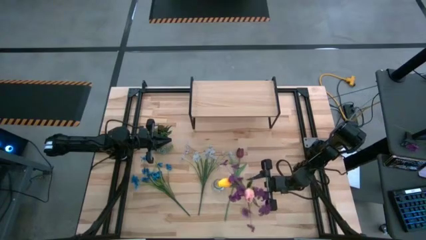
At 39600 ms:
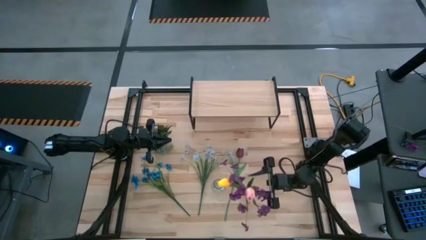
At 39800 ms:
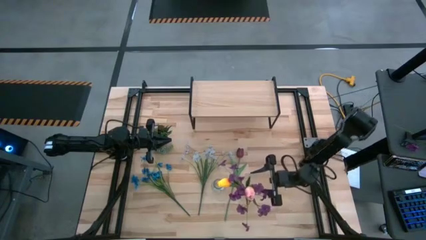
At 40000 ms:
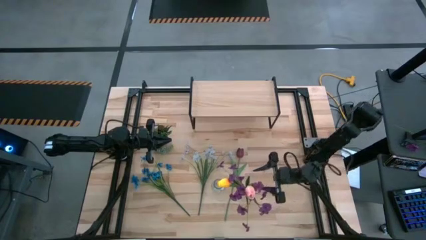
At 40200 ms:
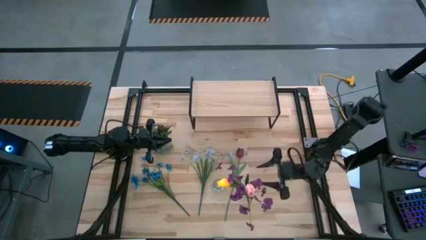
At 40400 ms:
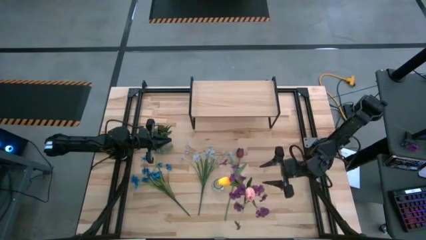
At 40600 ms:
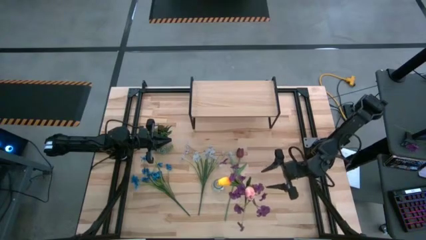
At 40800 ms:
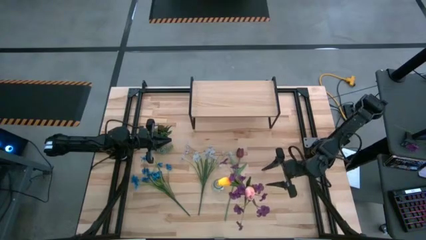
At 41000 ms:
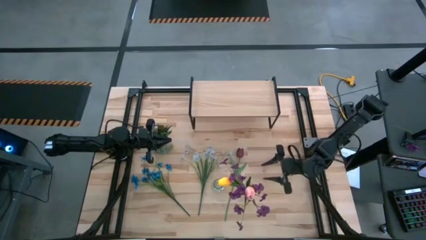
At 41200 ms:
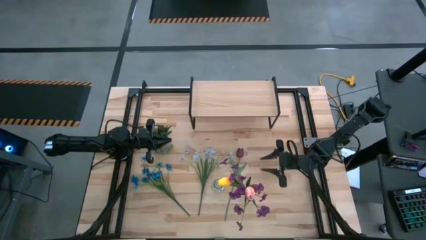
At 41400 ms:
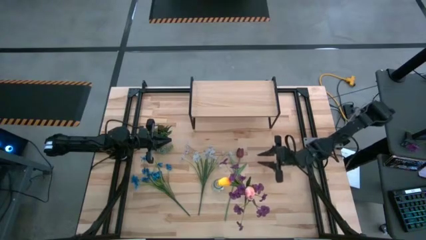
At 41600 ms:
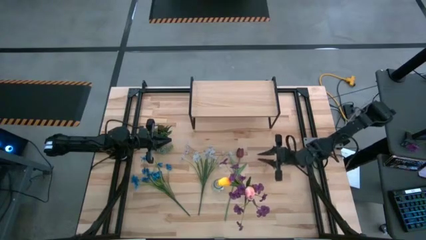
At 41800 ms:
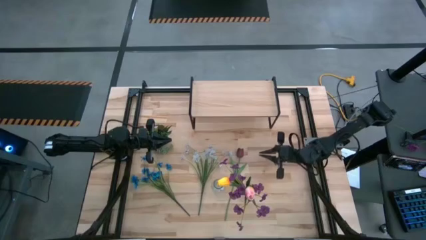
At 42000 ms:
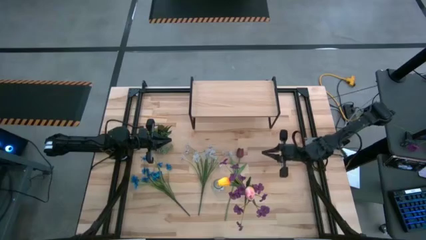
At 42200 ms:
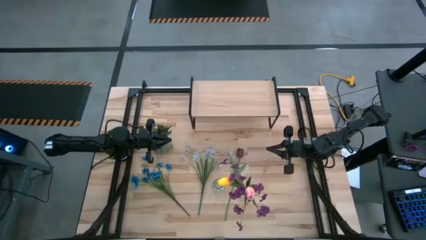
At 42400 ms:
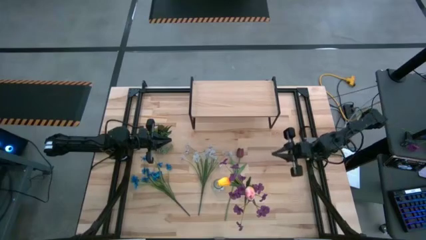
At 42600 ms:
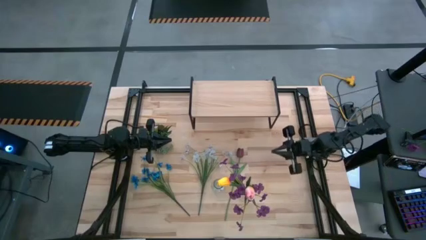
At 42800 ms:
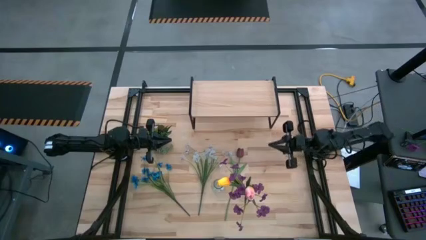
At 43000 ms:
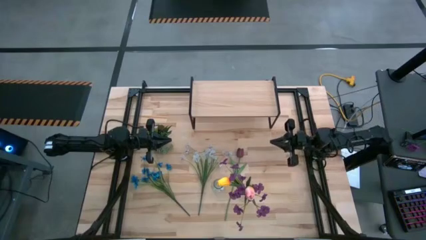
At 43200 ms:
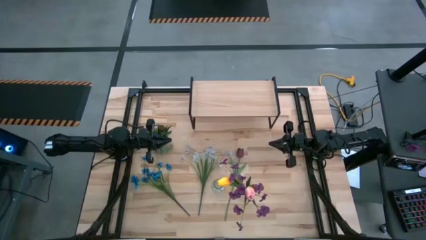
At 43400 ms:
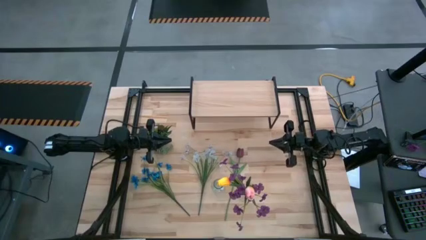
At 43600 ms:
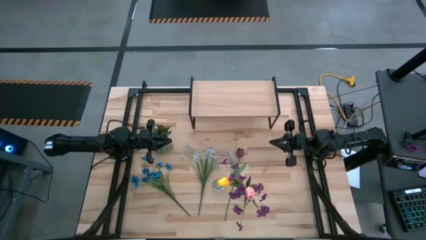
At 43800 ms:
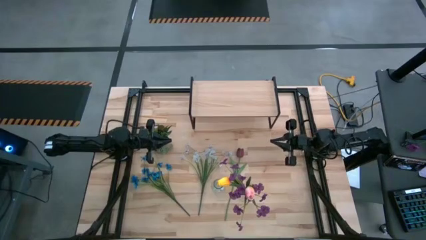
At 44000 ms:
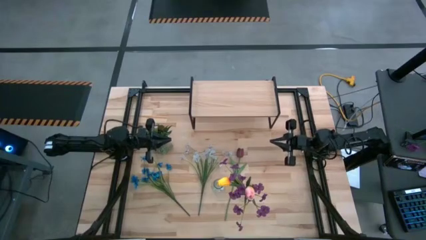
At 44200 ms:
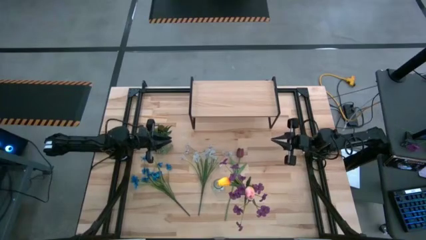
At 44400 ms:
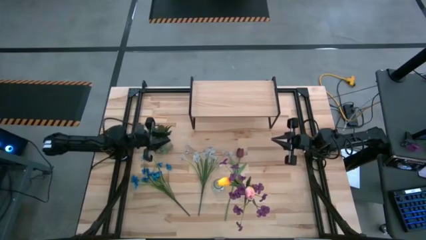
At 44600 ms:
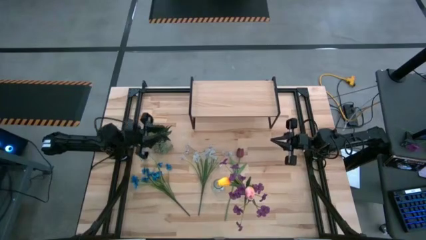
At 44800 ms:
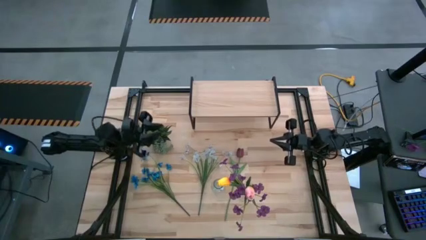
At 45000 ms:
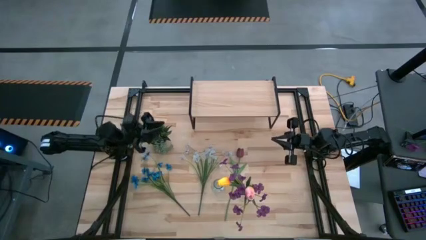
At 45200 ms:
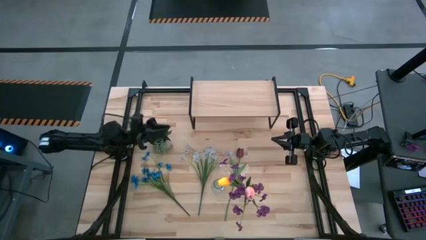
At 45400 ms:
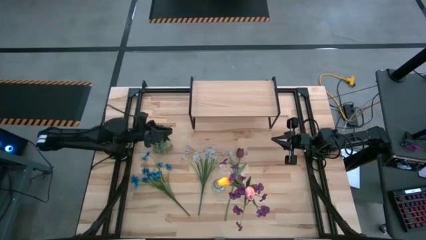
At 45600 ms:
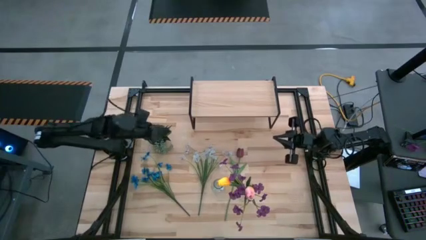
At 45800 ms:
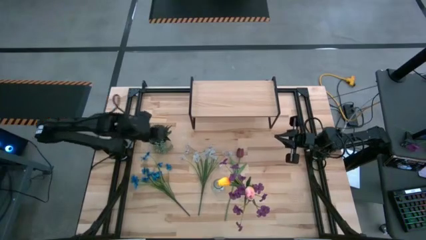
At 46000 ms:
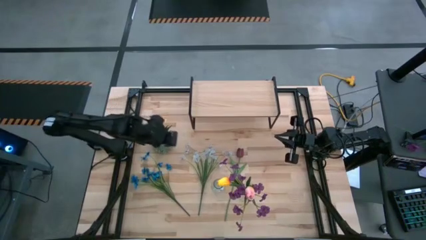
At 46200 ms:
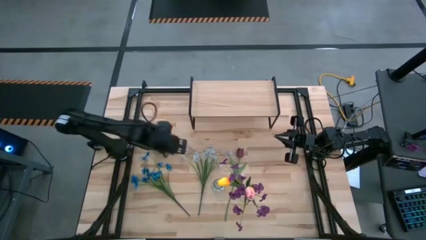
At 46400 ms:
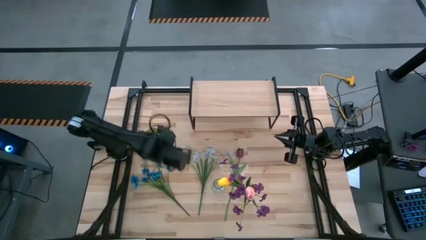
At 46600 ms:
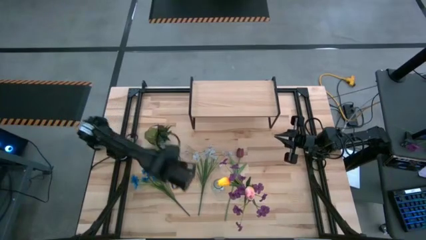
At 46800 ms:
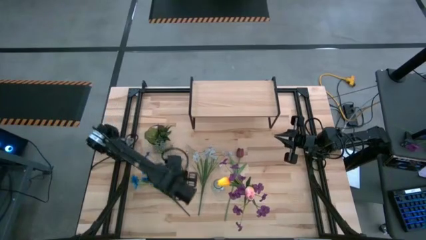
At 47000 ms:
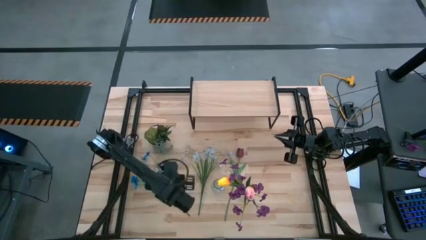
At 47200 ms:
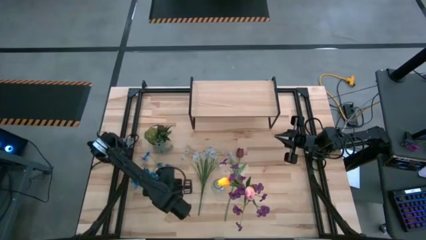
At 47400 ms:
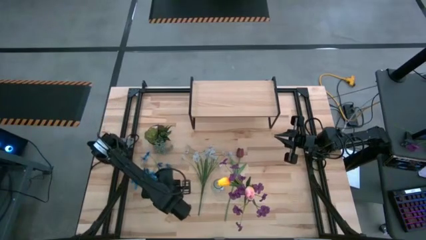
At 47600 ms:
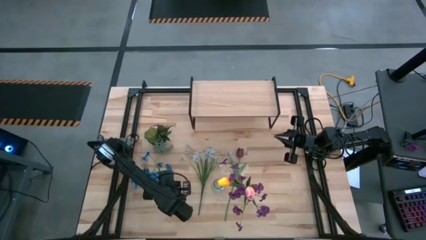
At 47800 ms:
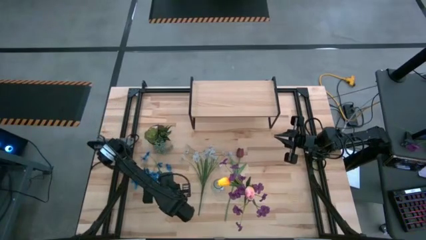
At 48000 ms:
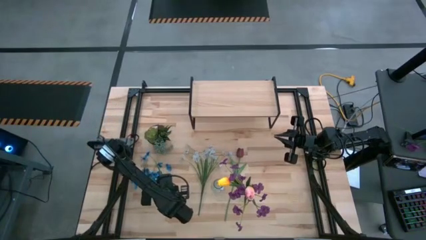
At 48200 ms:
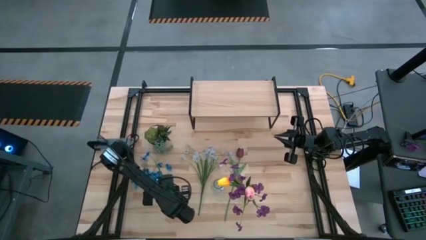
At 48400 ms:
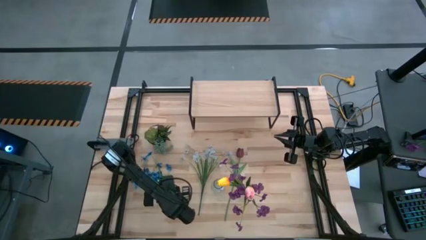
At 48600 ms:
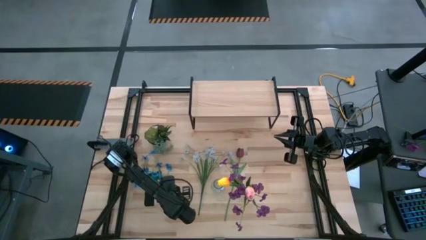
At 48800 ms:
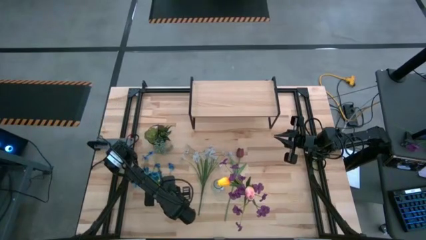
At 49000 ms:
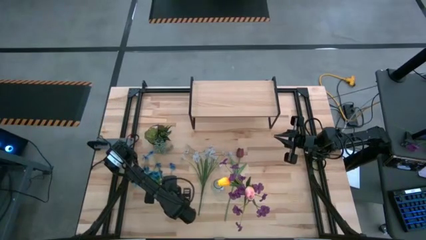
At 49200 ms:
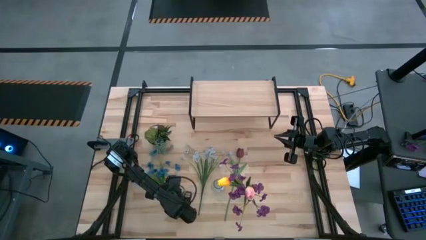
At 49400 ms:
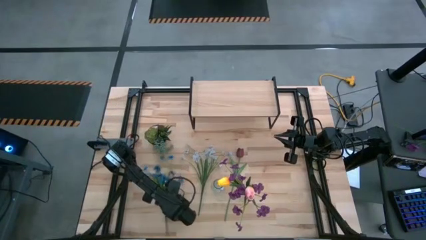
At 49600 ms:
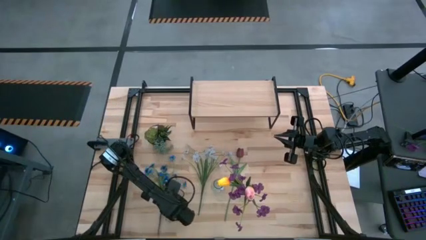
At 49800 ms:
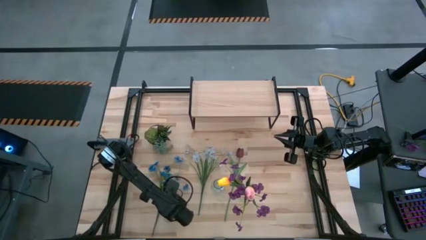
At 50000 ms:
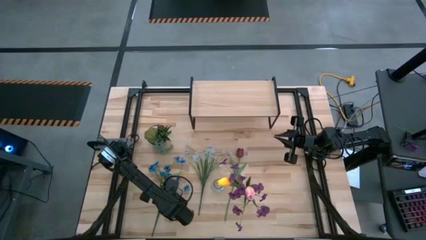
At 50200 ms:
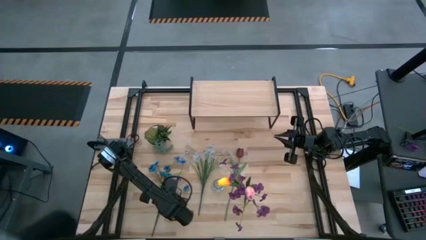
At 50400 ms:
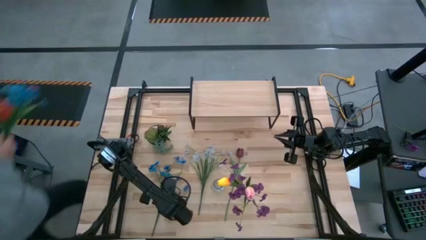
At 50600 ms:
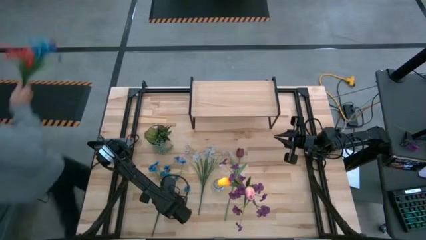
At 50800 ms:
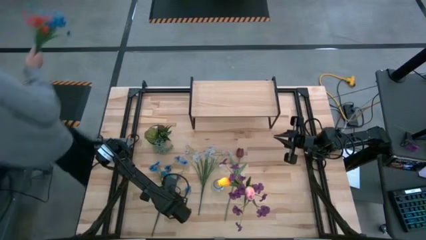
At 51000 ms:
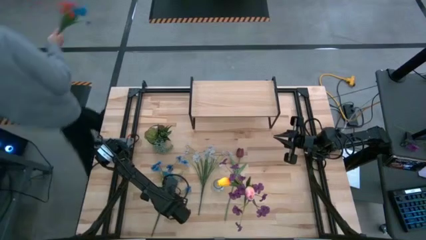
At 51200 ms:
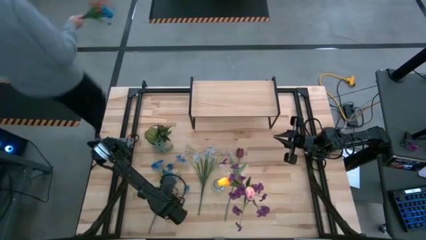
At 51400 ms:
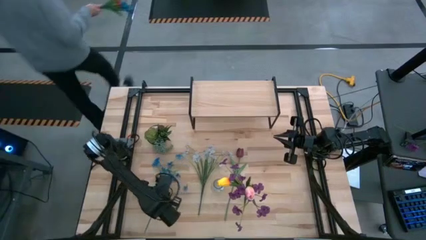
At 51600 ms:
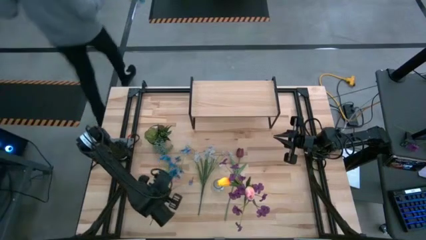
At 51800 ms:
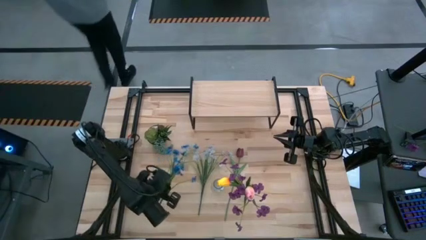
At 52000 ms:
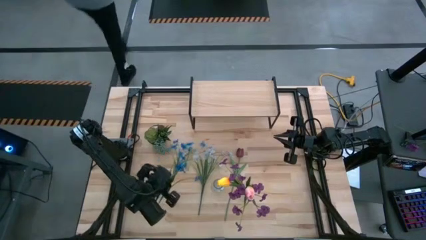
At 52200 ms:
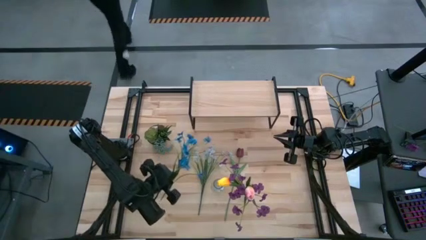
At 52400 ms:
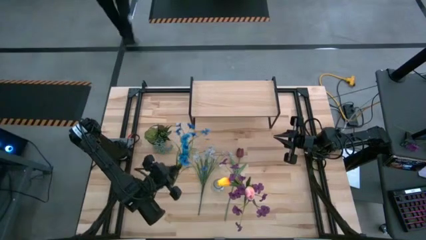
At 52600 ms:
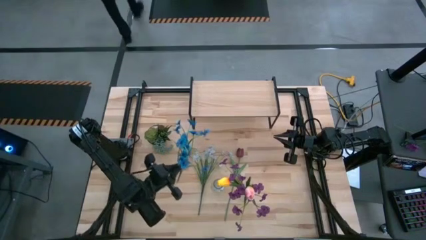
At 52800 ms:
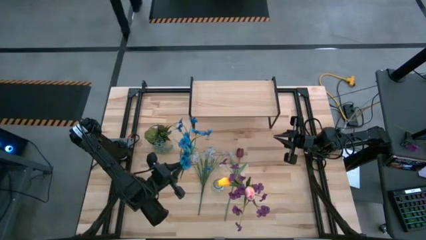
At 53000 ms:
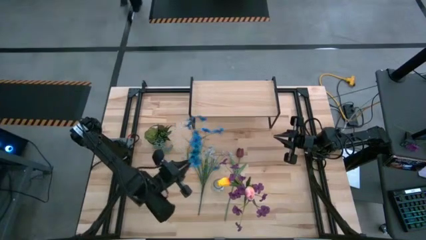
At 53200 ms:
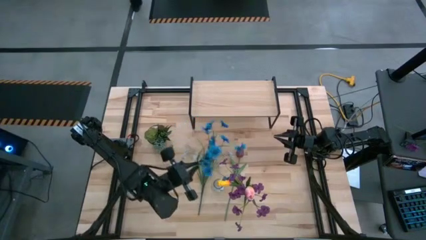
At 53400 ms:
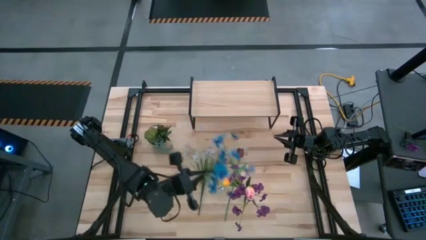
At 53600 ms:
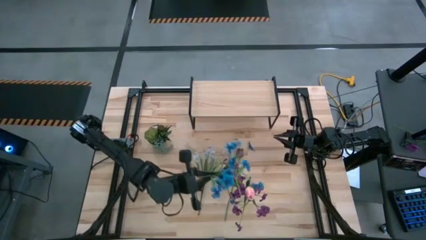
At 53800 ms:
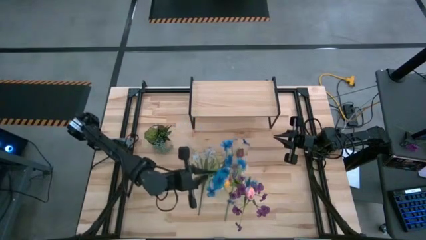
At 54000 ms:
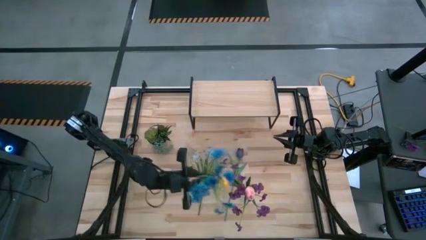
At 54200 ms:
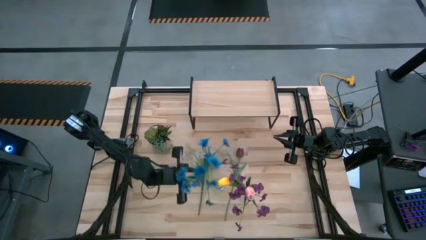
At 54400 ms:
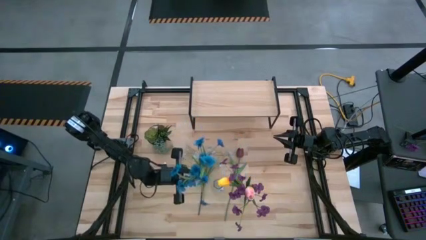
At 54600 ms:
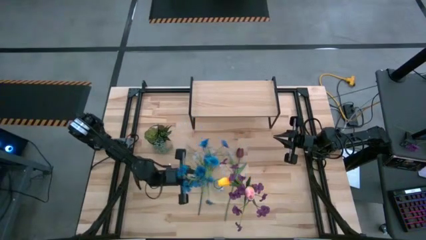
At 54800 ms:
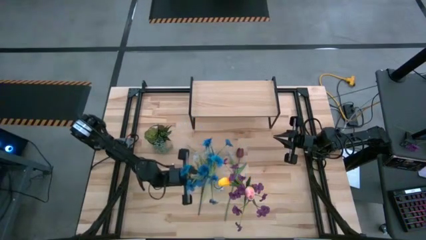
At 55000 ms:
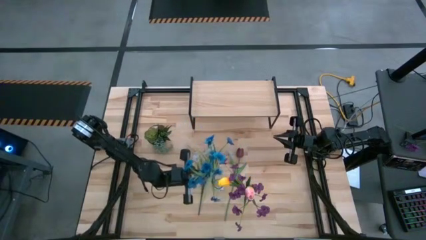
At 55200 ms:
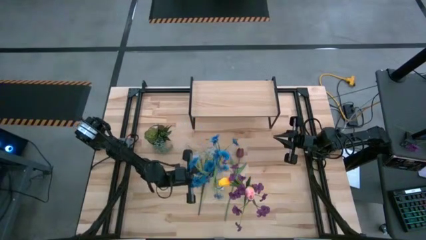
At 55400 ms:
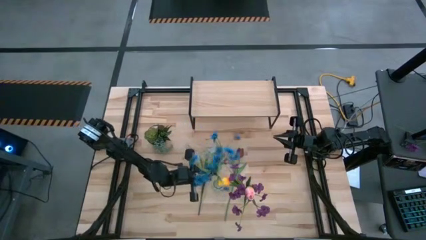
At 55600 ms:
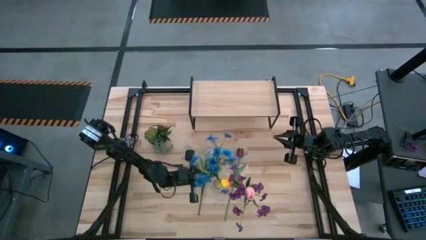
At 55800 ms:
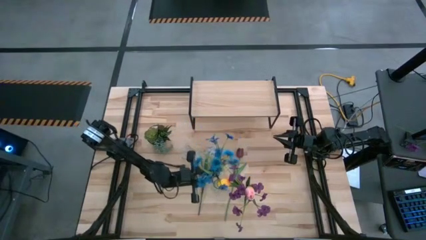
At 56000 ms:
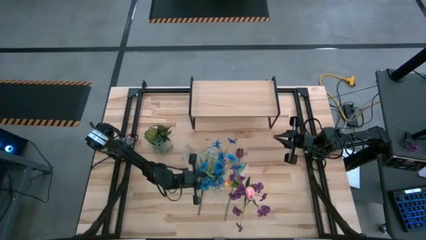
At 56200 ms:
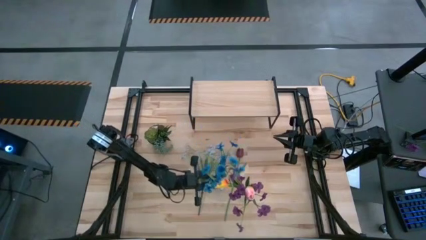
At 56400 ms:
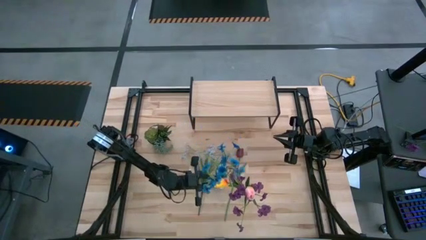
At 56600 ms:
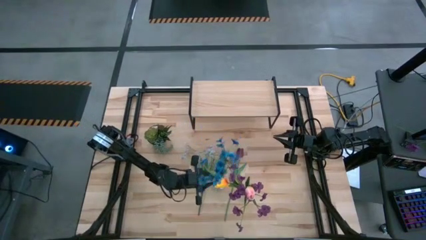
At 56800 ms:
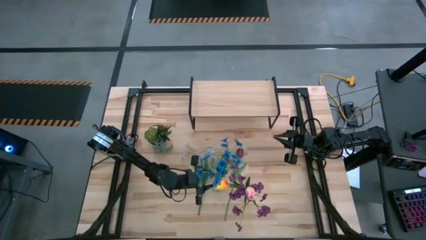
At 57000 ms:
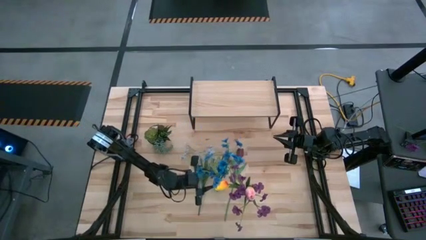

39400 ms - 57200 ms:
Task: Pick and place flowers into a vace then onto a shelf
Put the blue flower into the left transparent vase
